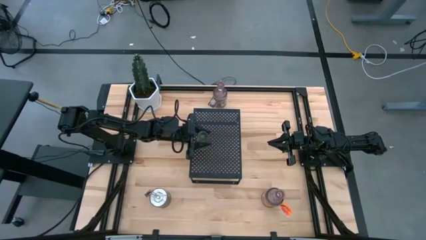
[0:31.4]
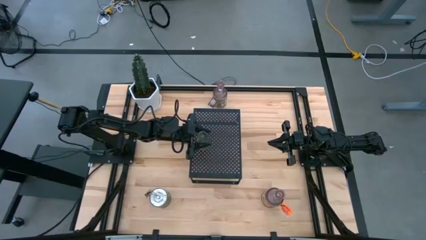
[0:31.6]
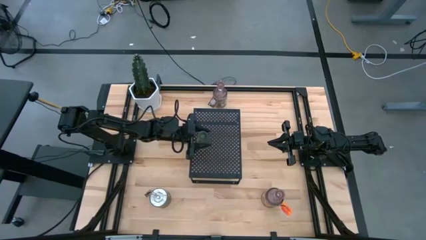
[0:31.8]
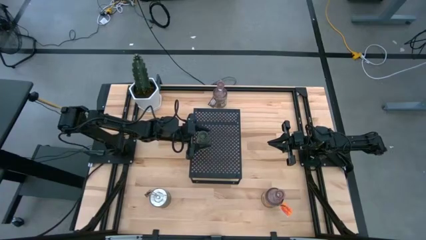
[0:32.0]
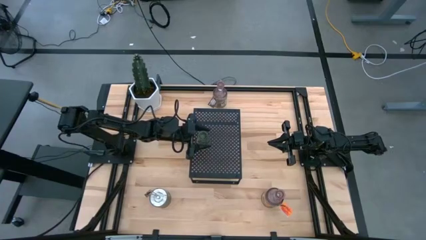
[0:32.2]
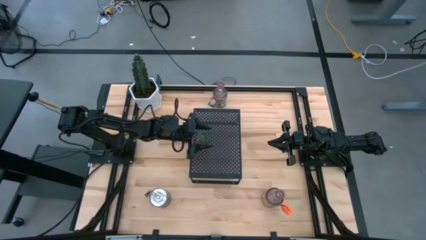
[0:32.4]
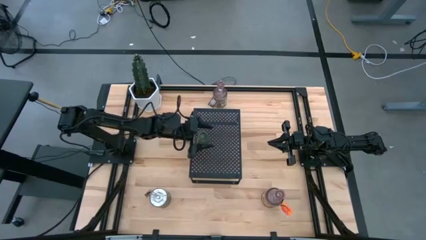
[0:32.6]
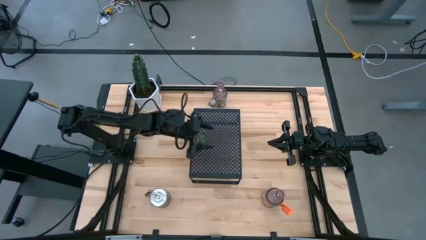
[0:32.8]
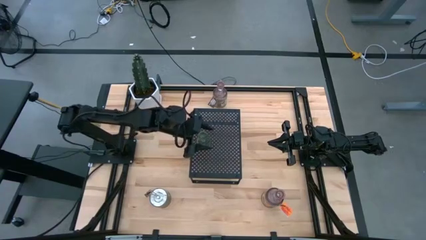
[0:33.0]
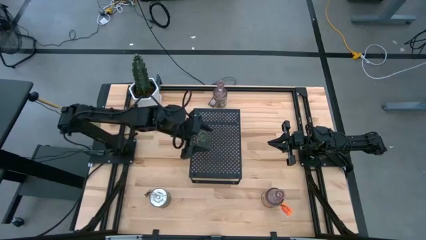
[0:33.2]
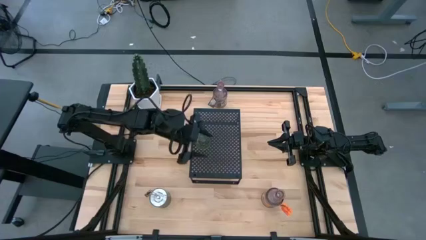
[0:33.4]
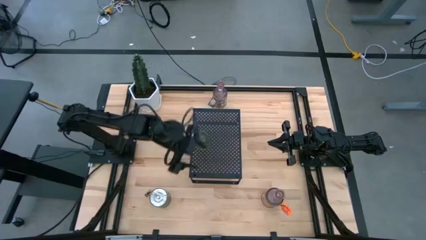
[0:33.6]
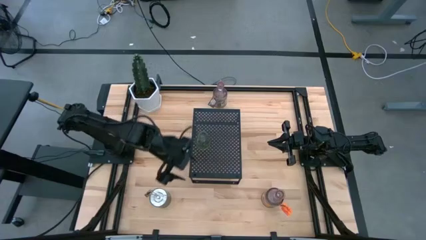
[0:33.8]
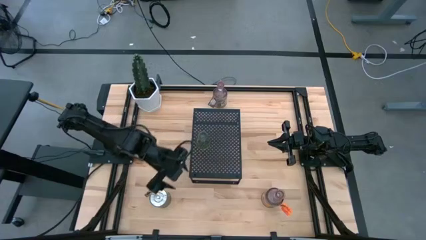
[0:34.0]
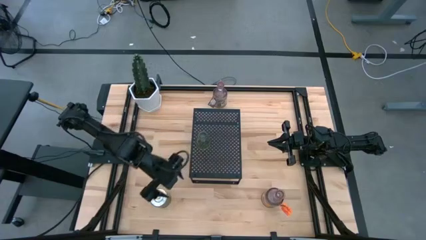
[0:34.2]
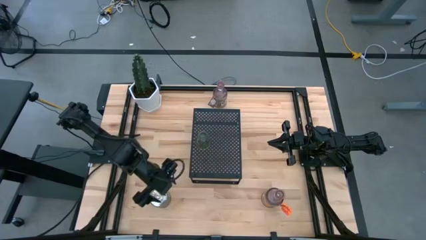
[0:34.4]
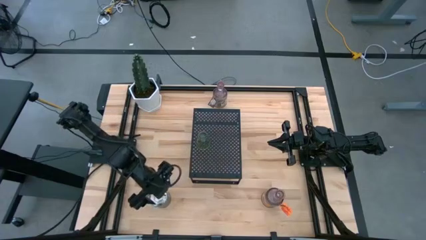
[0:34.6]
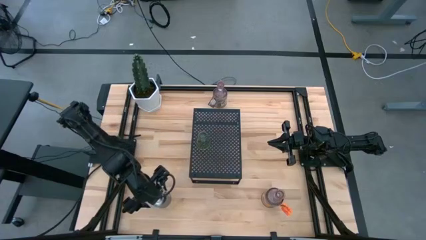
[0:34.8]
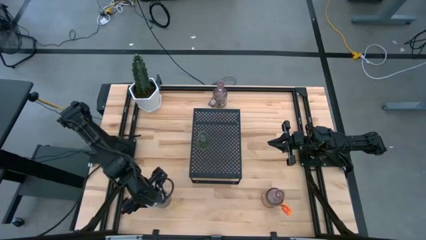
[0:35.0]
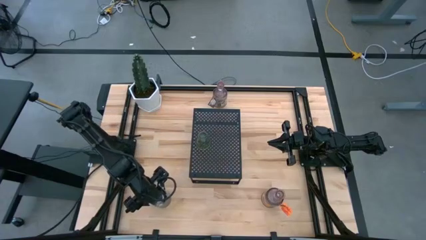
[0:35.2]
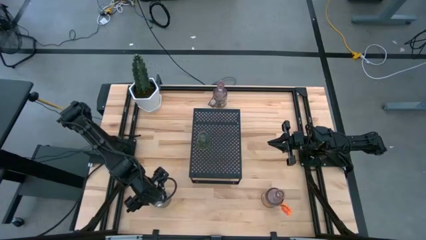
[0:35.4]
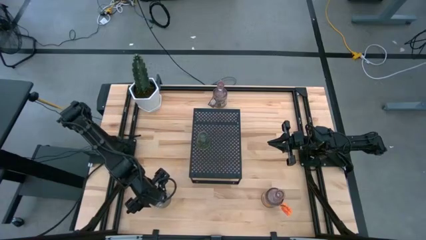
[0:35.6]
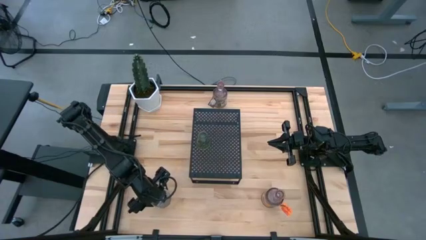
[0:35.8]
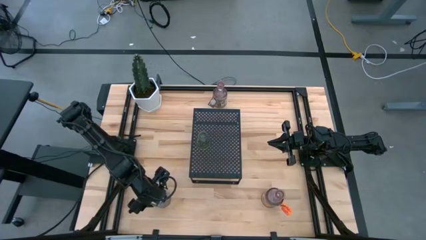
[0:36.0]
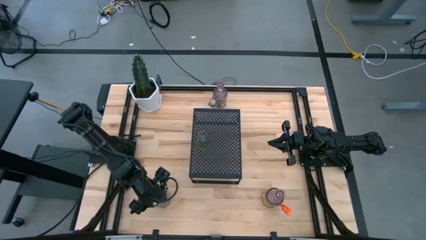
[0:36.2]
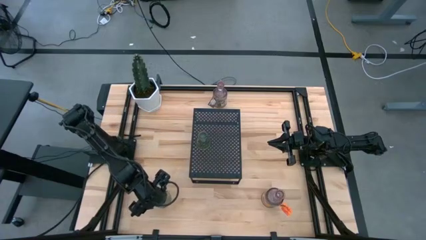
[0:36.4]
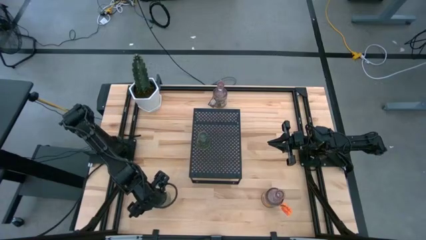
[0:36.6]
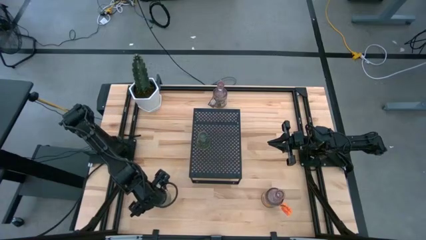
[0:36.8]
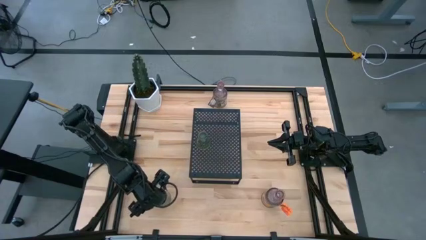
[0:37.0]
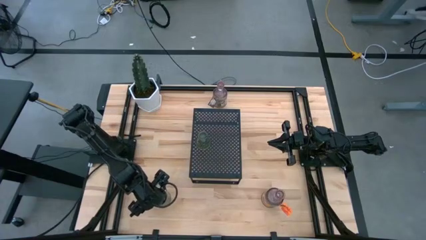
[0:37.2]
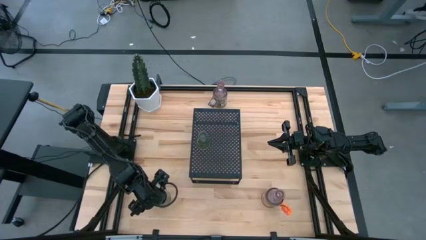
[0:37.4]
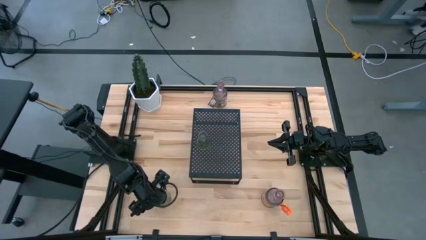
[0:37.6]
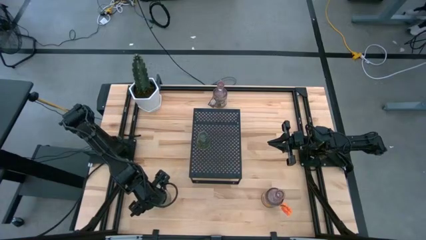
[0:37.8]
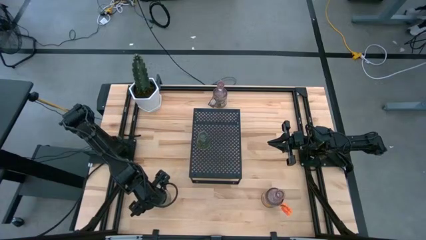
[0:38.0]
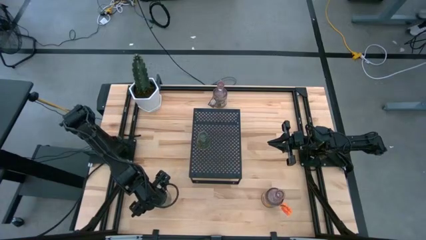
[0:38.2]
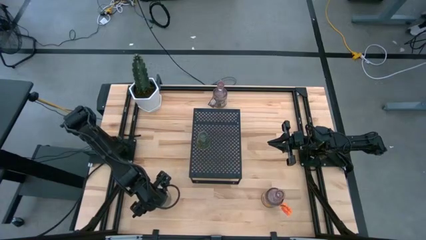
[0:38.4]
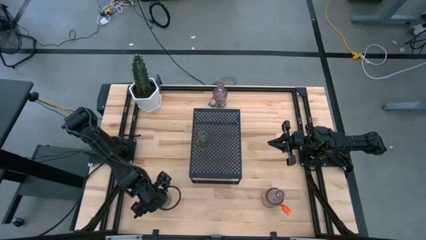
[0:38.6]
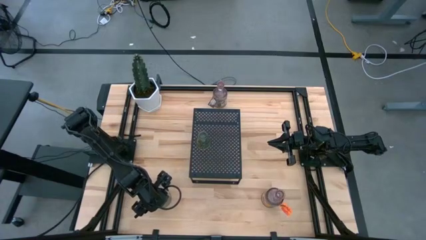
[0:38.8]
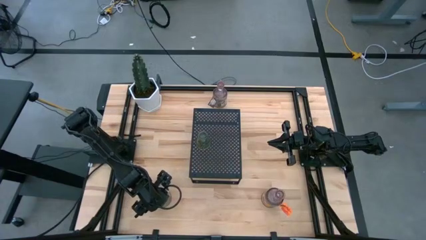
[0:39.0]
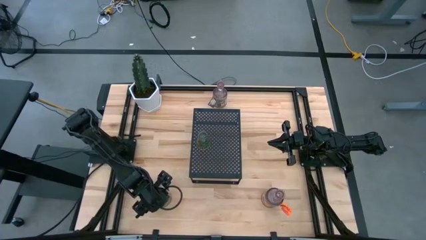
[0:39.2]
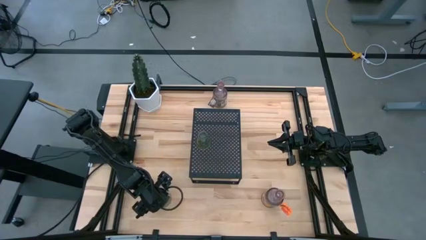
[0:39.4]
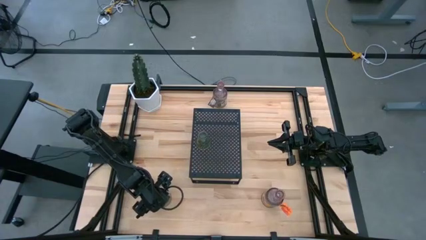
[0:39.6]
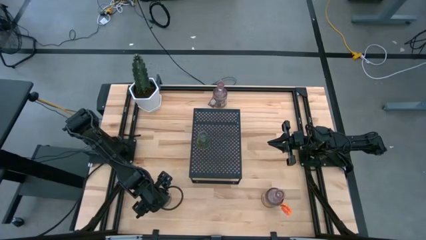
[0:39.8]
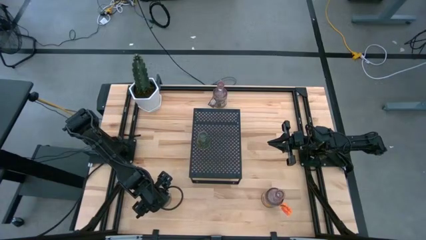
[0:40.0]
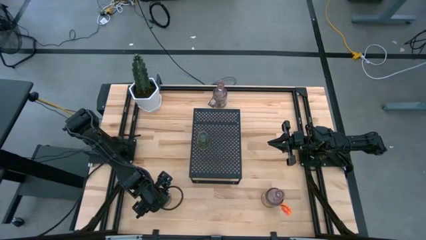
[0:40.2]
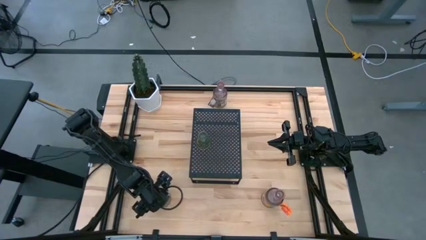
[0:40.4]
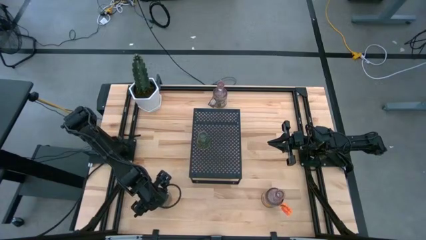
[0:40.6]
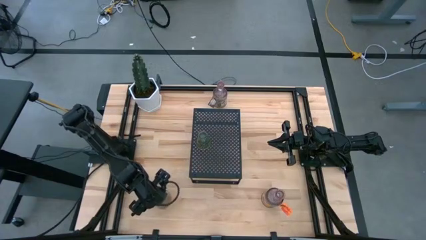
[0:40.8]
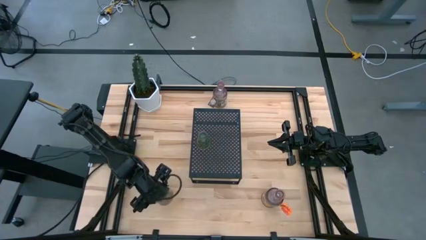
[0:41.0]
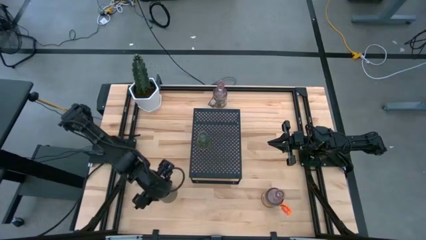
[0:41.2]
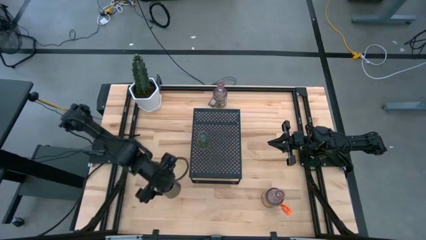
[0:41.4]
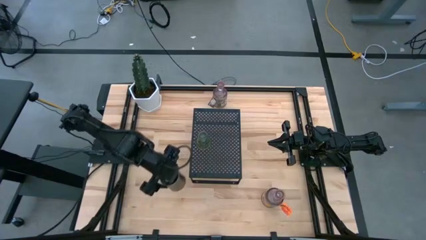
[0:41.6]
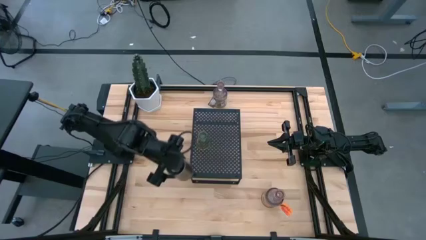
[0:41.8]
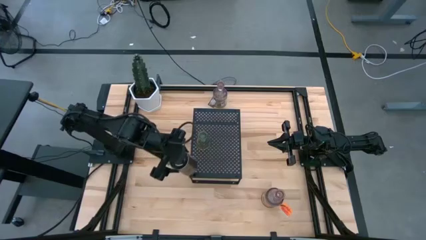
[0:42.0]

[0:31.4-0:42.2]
Task: Pick & Place candle stick holders
Put the left brown scented candle on the shelf

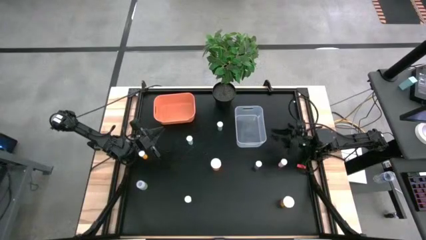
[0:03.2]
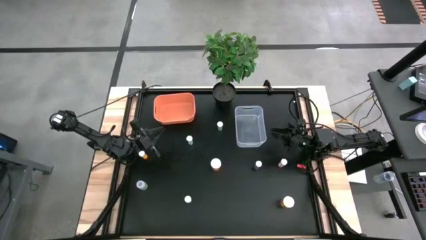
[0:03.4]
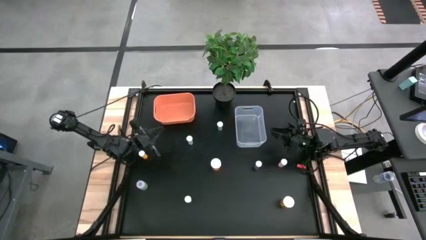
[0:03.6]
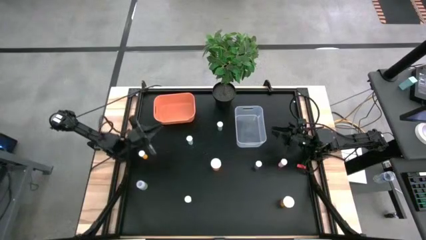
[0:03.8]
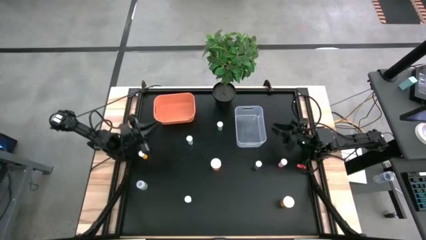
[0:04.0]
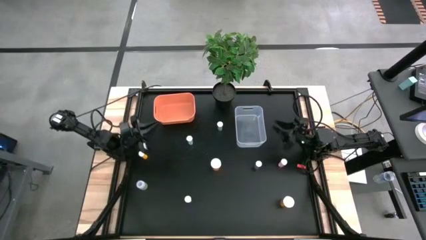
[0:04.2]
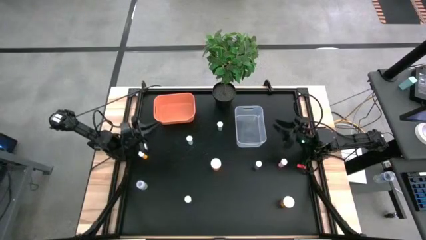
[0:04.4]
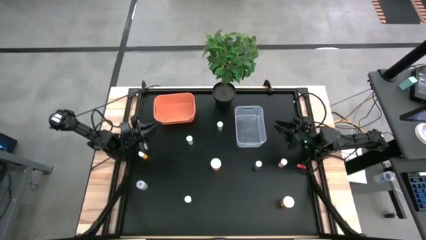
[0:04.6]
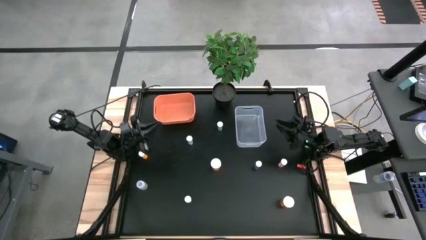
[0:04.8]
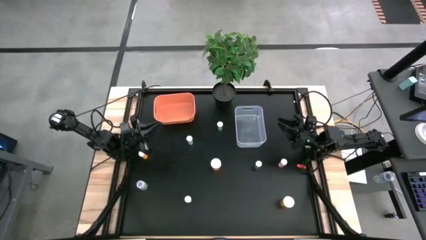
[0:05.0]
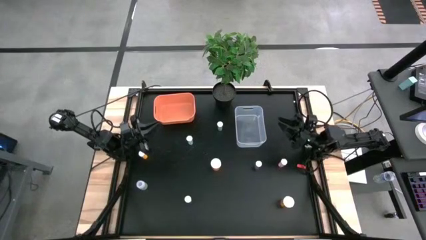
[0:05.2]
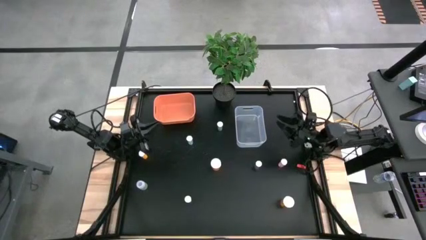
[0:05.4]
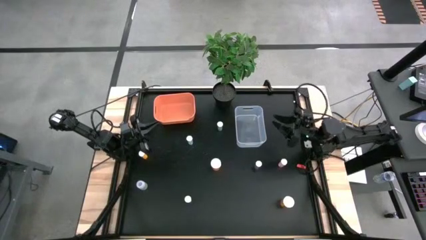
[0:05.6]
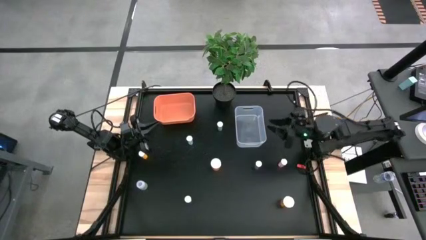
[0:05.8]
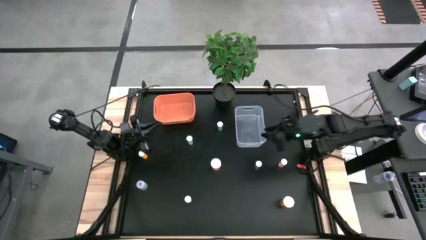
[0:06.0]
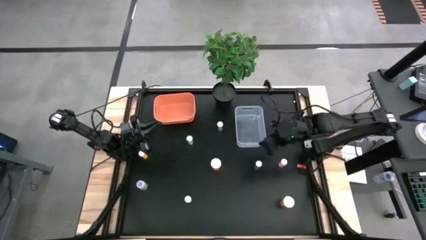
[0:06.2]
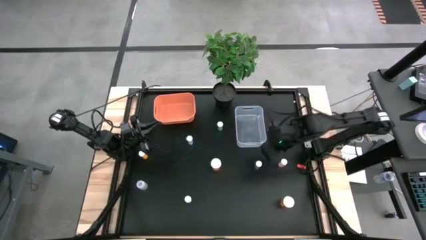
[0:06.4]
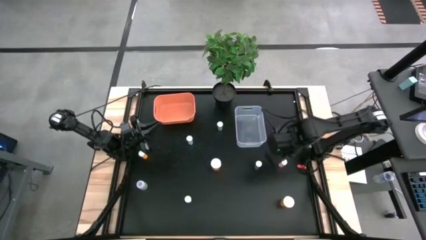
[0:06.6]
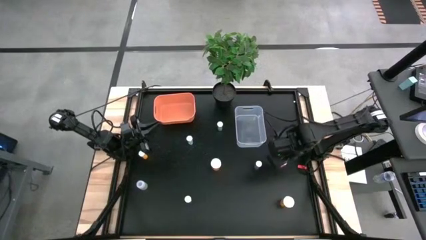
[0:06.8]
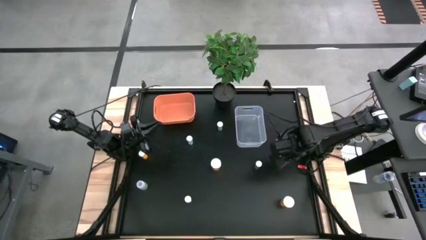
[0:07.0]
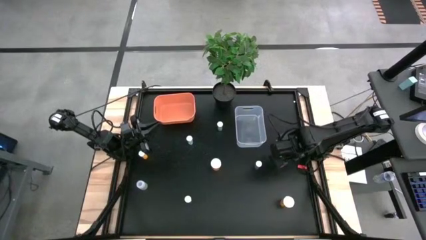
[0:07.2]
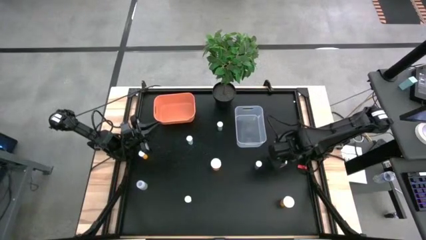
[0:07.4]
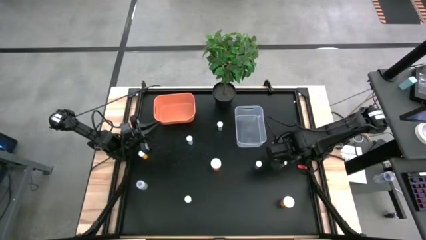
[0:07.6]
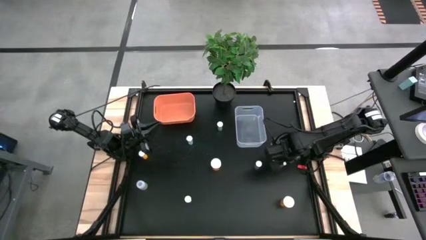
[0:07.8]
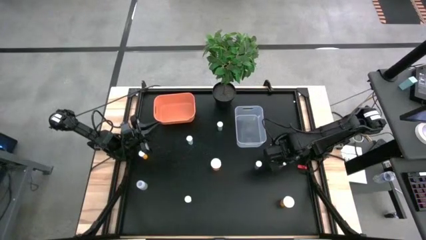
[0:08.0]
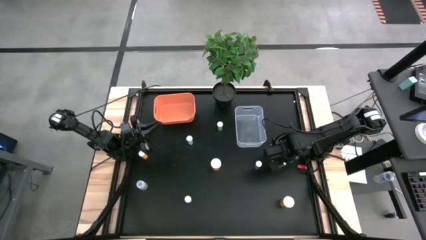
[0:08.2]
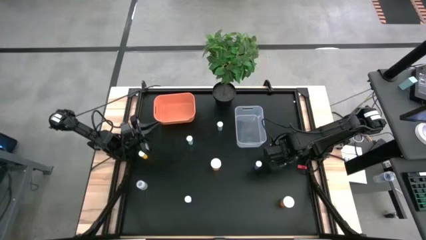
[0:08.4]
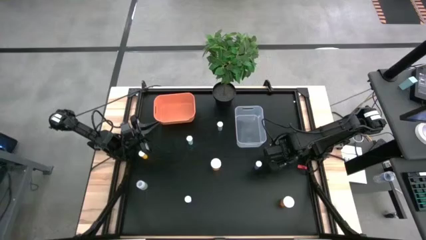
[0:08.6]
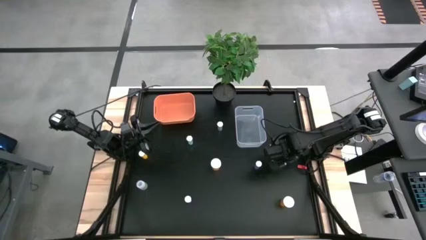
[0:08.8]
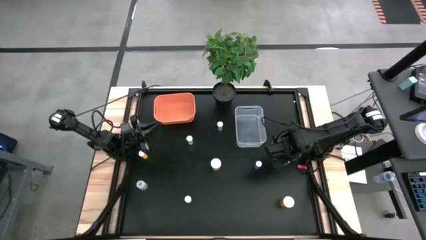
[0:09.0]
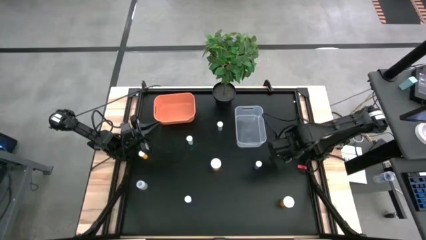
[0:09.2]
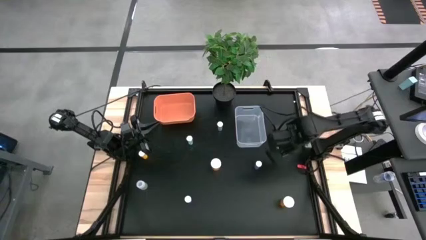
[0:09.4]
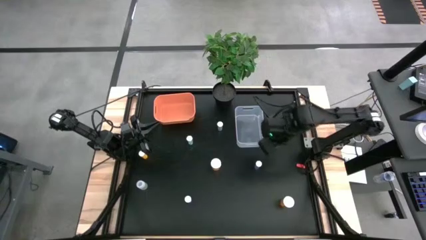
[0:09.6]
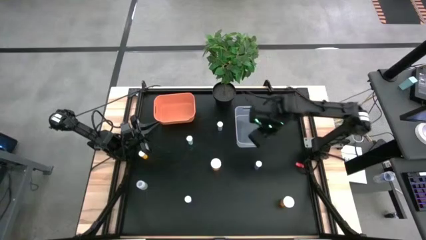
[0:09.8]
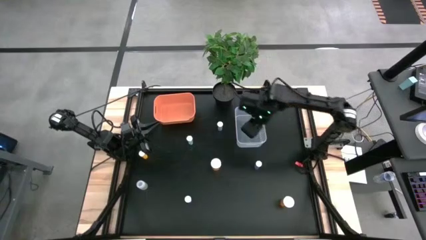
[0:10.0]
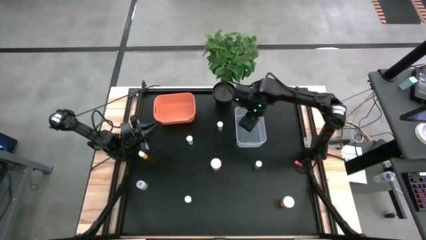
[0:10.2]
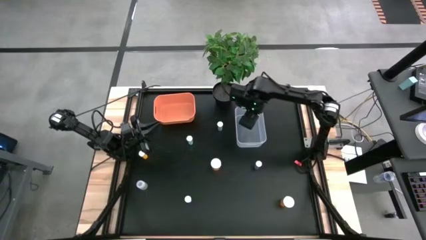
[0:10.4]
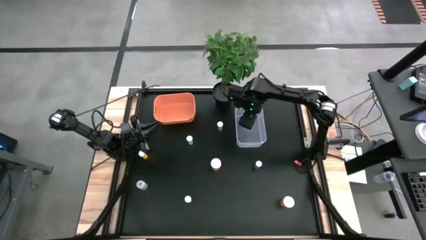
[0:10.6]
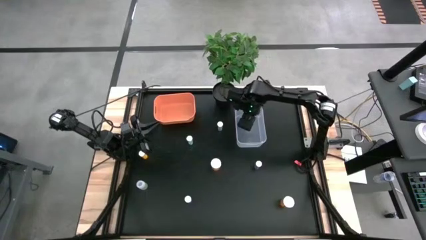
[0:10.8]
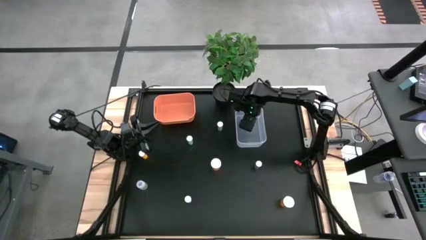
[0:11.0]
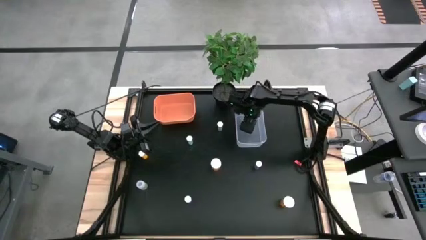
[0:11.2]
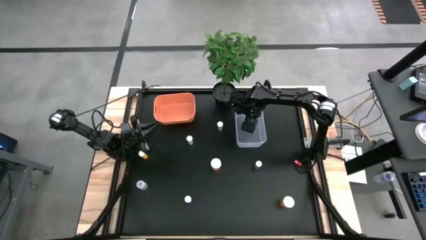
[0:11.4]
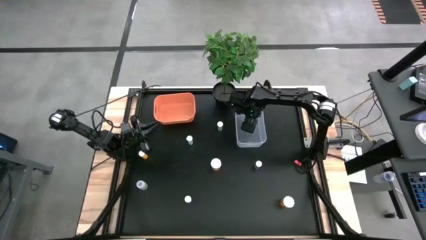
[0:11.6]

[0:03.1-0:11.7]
Task: Pick and place medicine bottles into bin by pill shape (circle, oval)
Put the pink capsule pill bottle into the transparent bin
